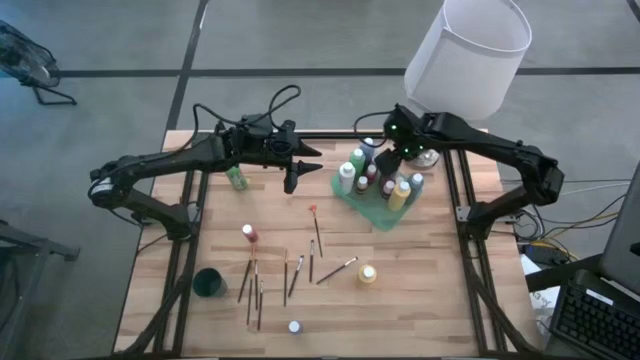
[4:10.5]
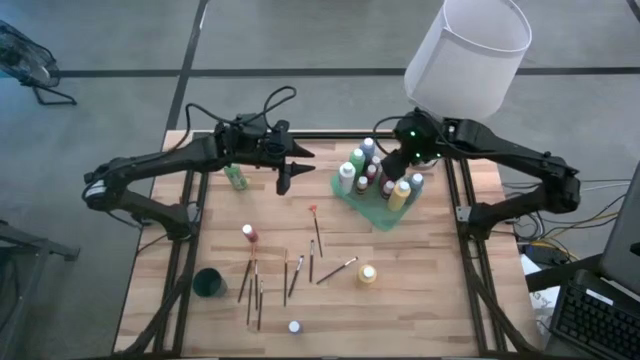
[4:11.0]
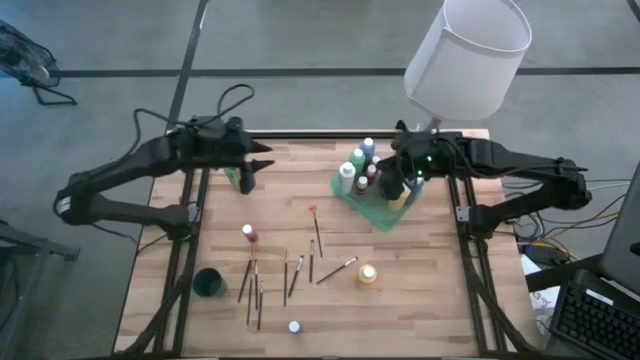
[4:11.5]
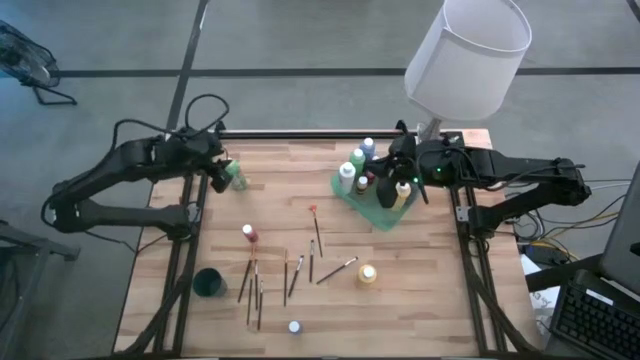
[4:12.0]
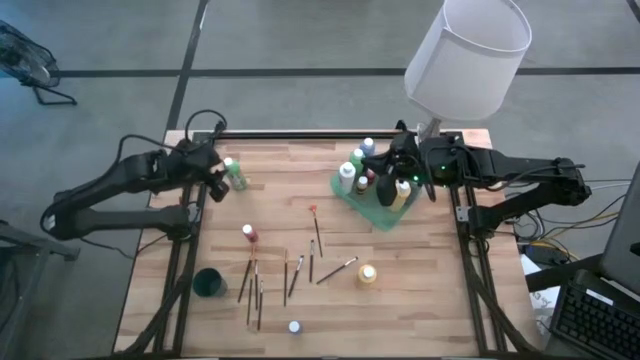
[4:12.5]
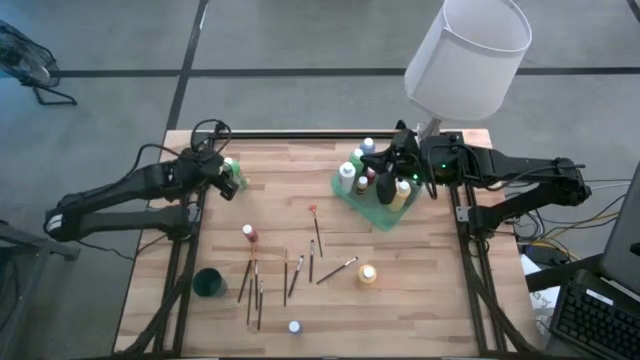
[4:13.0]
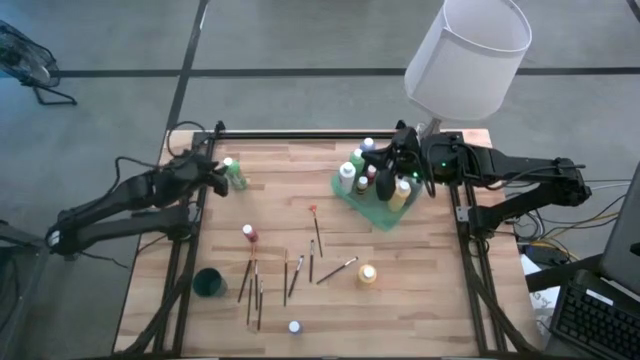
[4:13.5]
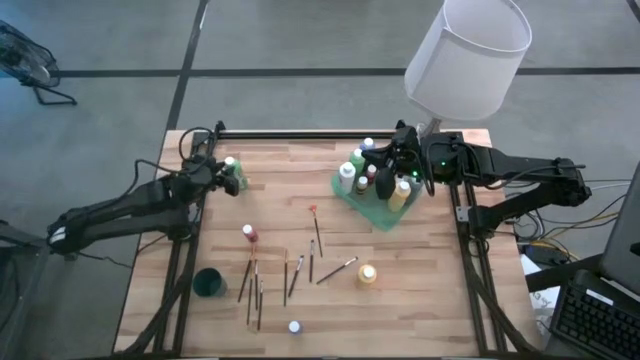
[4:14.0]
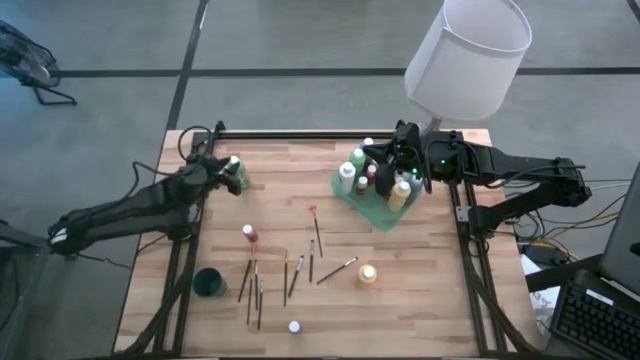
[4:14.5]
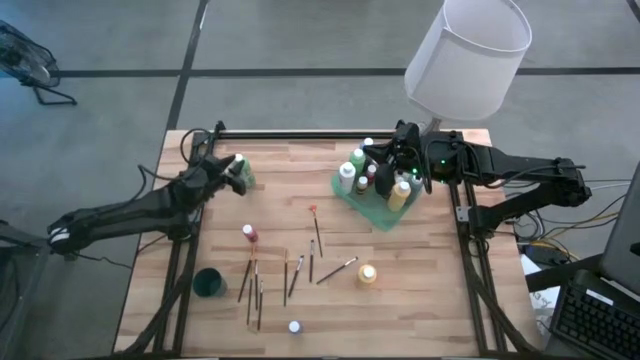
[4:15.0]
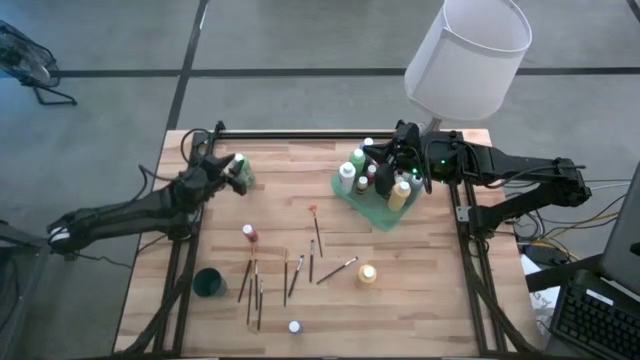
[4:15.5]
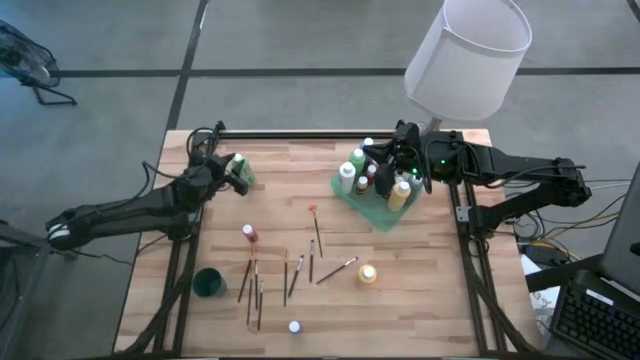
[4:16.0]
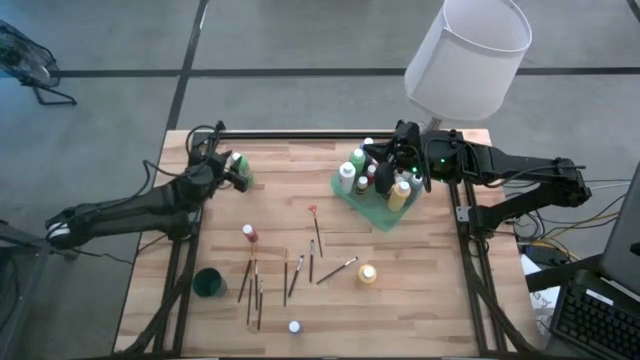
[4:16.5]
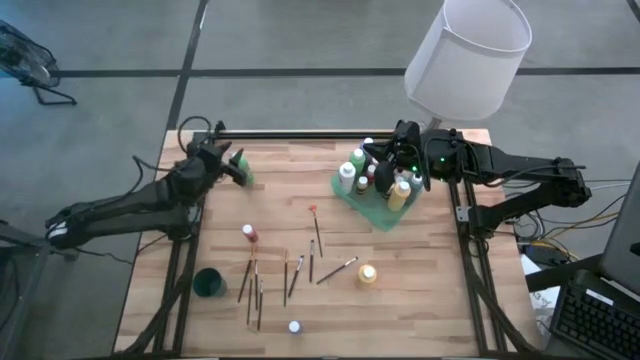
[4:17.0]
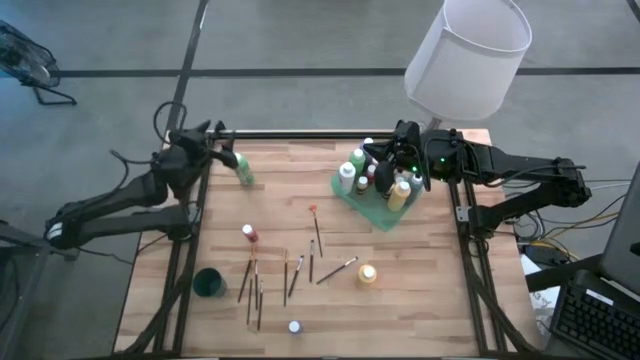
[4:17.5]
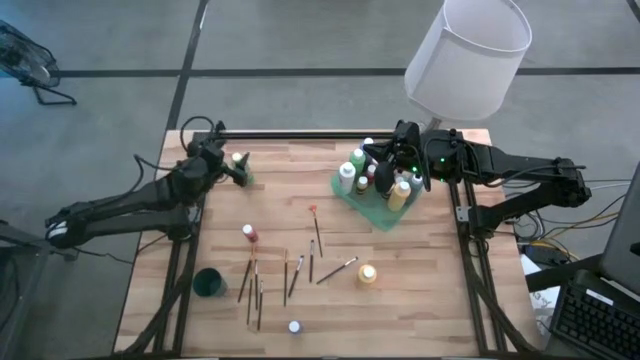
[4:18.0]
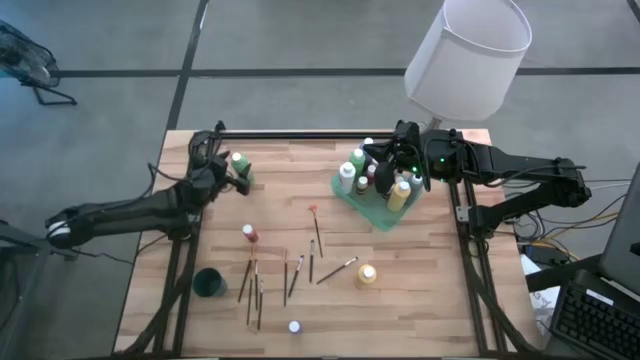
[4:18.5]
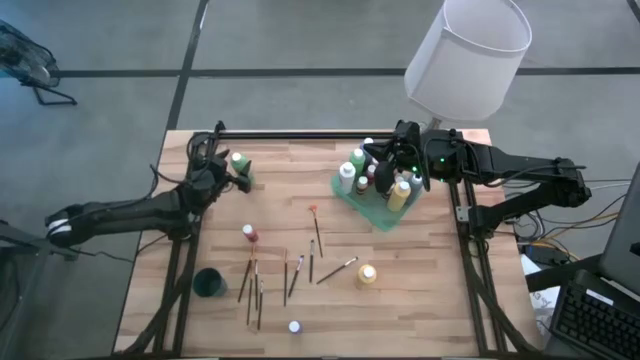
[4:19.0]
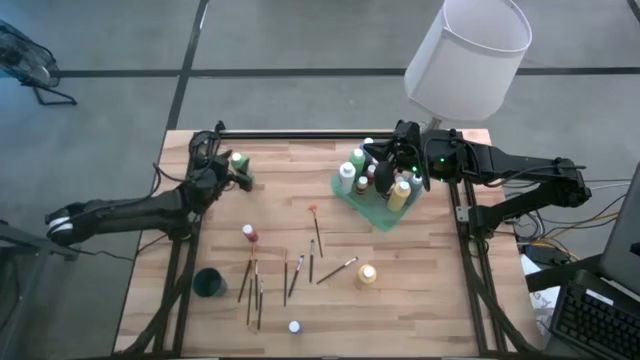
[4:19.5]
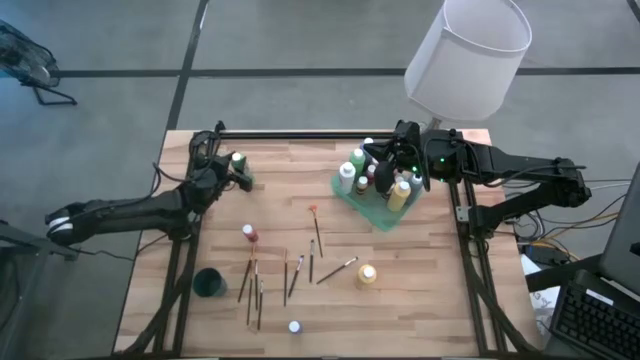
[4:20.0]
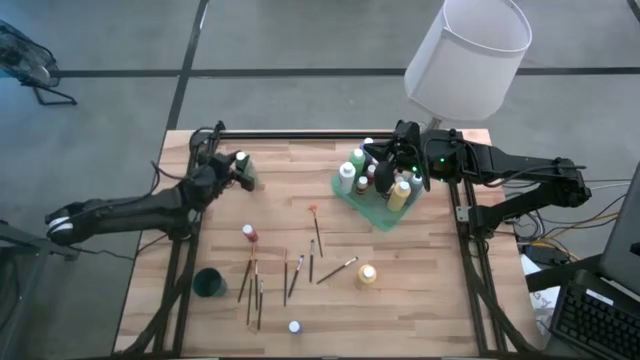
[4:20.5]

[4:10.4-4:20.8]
Task: Pick & Place Paint Supplies
Put the big green paint bottle into the green bin

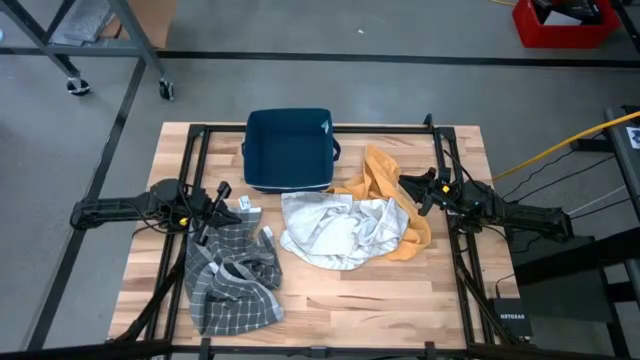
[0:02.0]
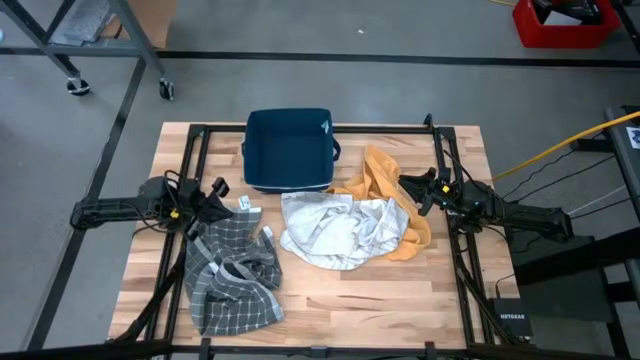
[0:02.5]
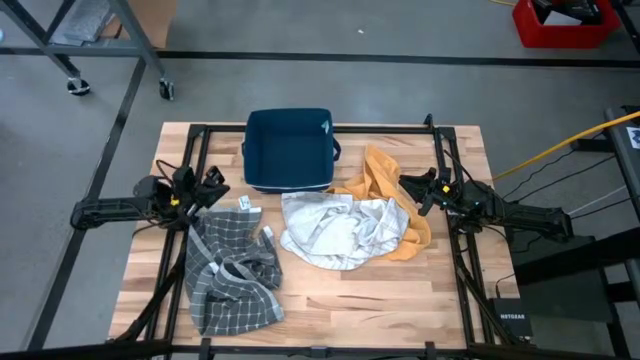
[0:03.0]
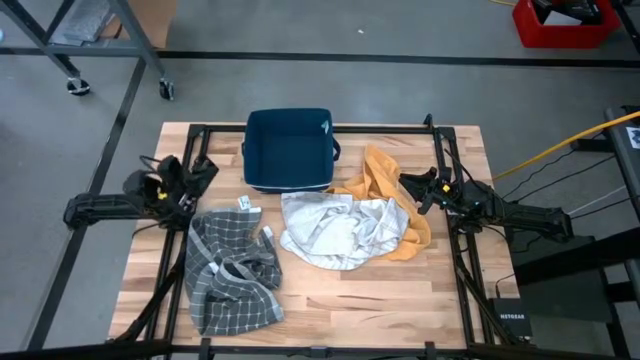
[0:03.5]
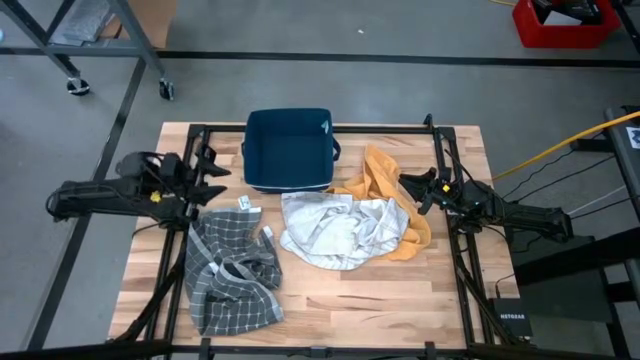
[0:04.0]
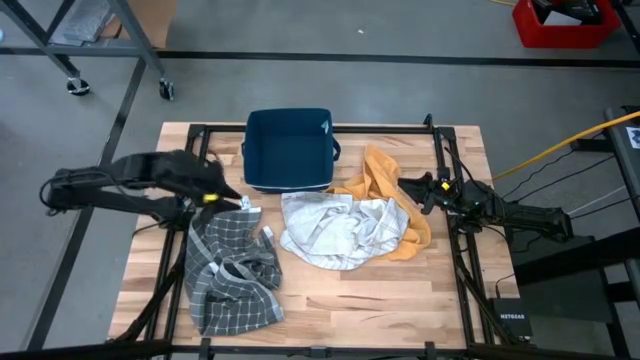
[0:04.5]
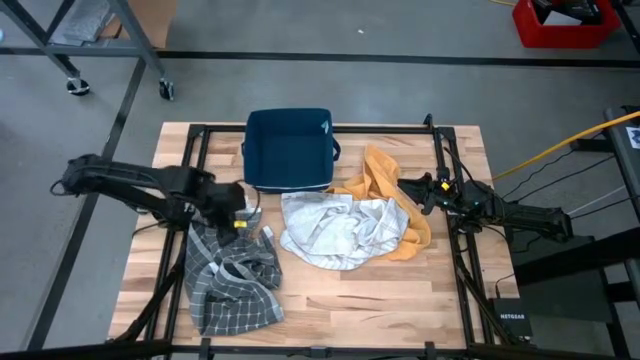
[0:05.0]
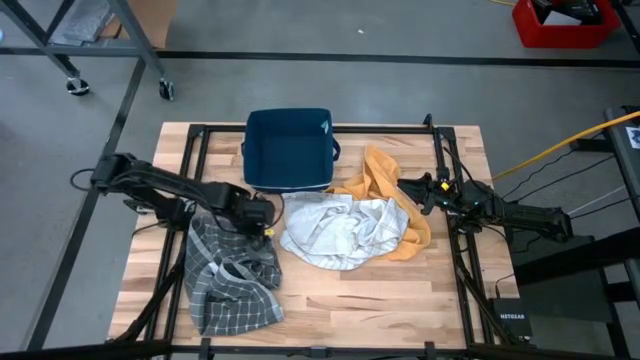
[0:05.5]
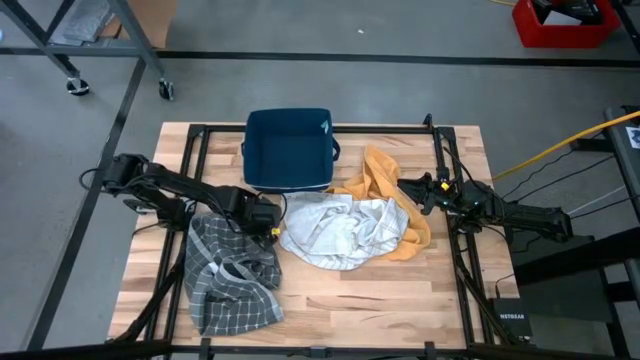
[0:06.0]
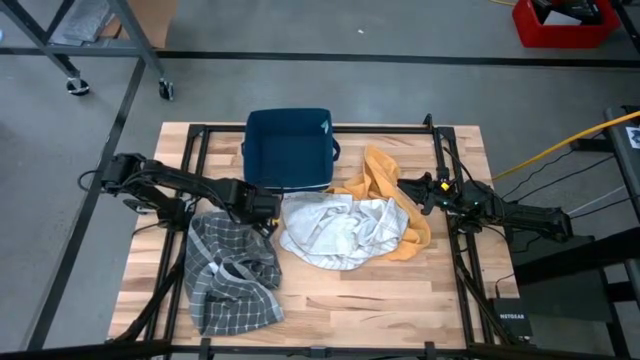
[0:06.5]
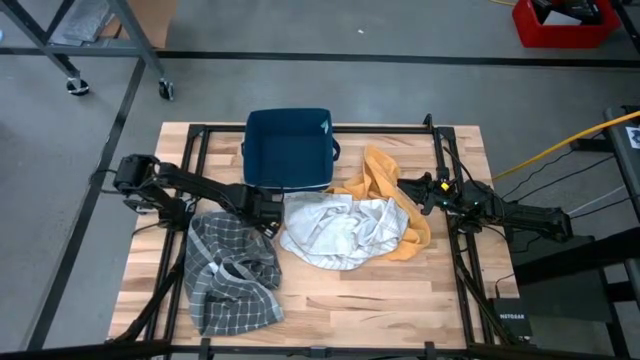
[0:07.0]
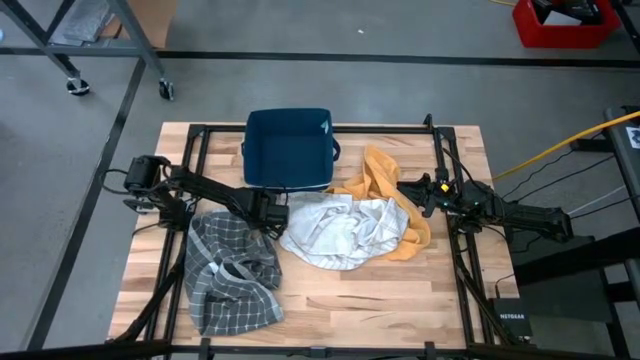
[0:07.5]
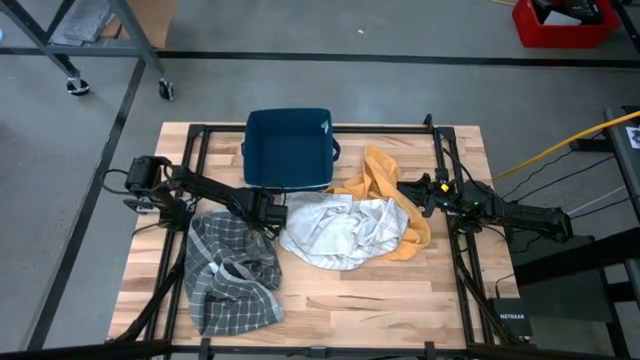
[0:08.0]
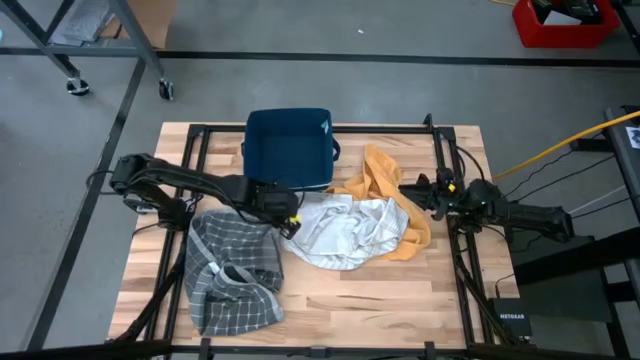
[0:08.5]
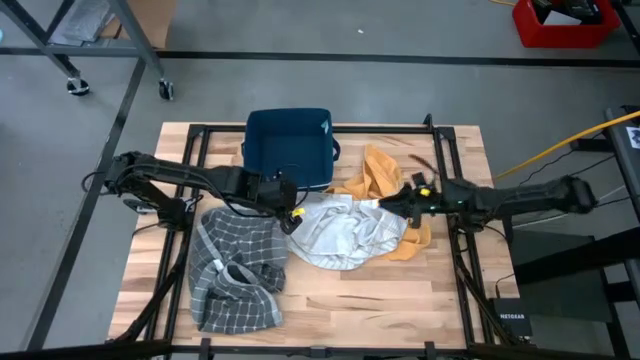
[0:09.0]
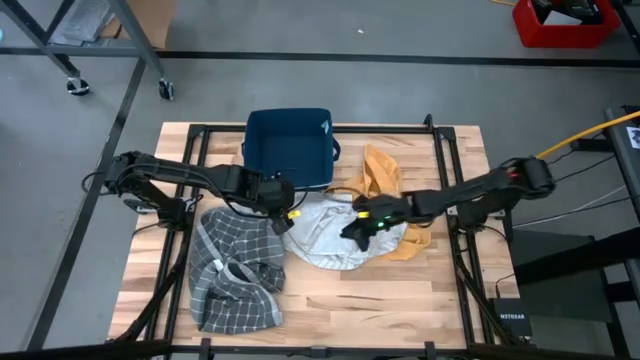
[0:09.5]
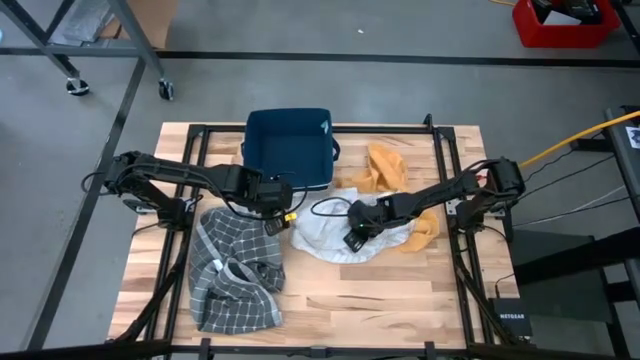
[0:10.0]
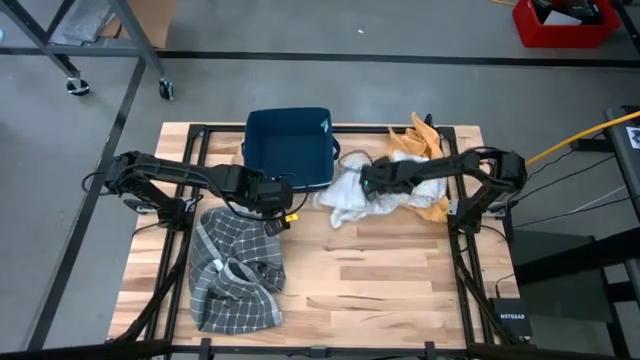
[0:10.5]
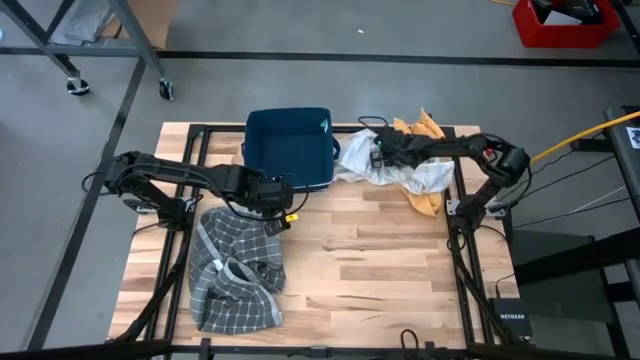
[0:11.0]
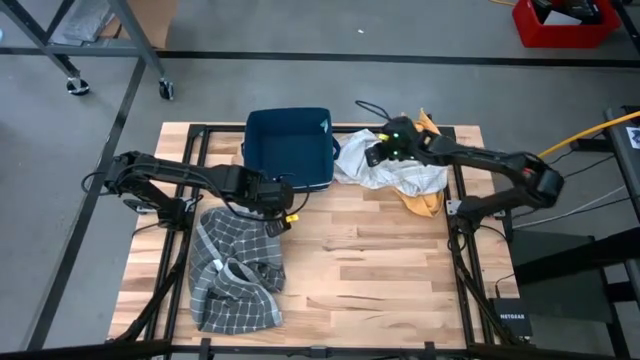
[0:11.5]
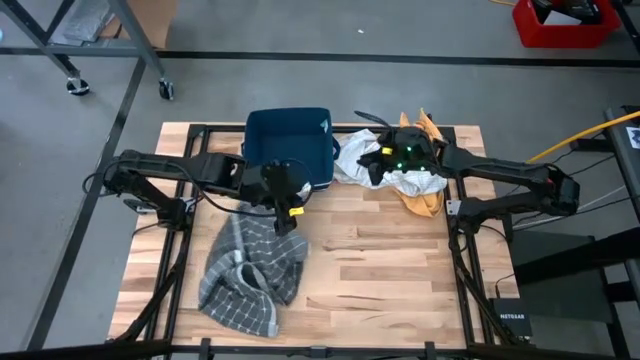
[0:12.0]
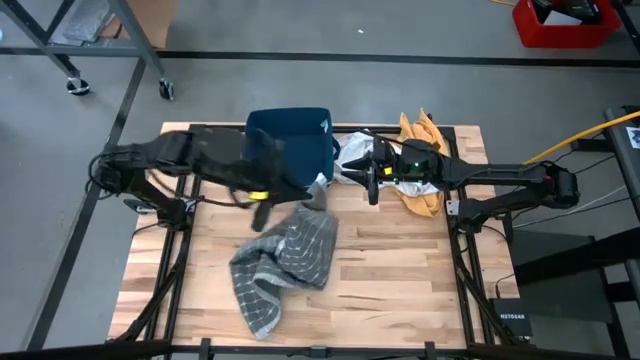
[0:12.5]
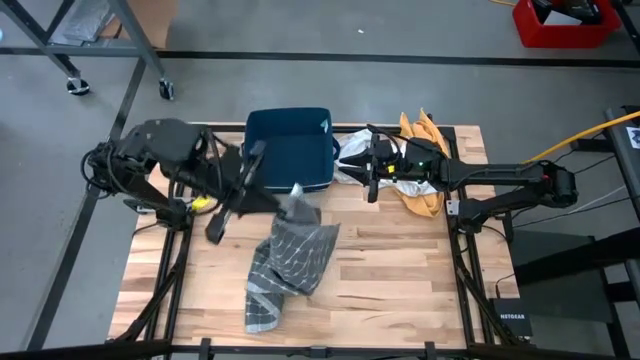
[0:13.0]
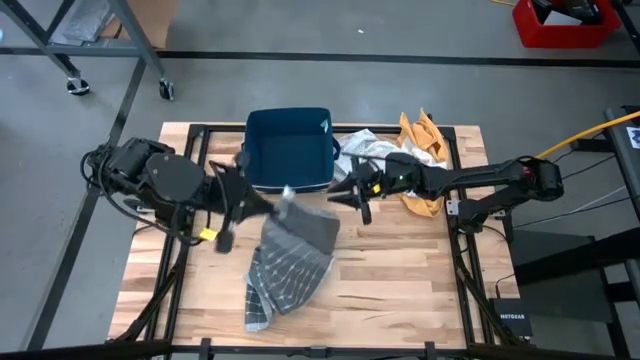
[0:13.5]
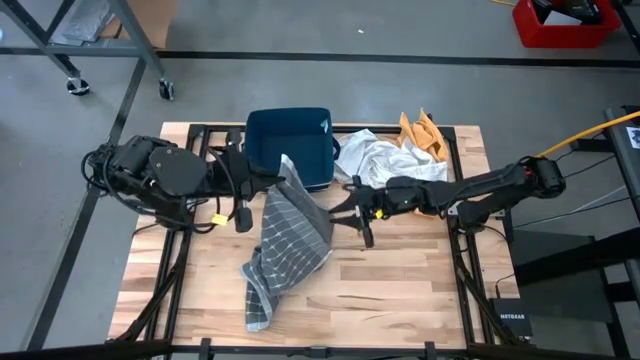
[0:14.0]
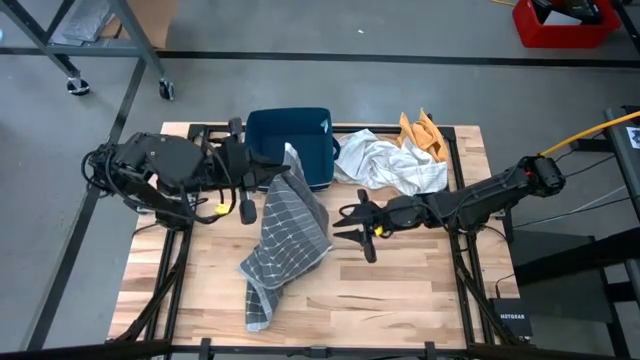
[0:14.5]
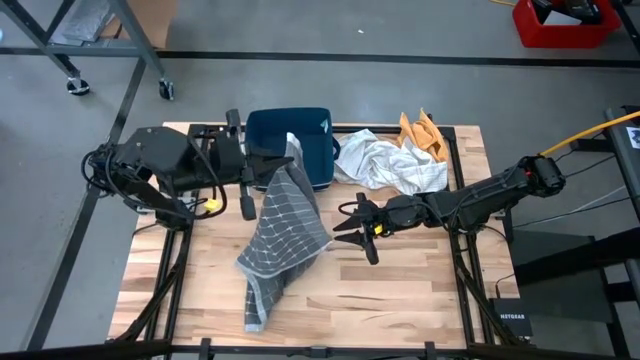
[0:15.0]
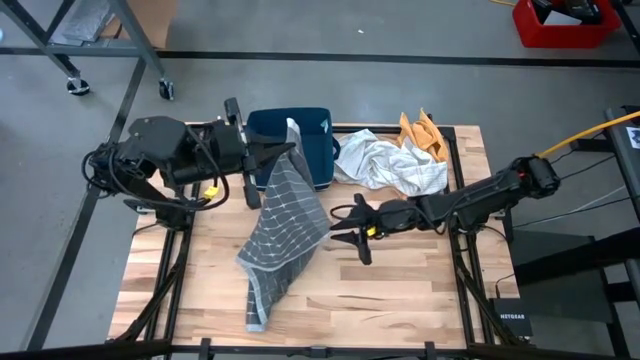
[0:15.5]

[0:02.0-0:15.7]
Task: Fold towel
Fold the gray patterned towel
